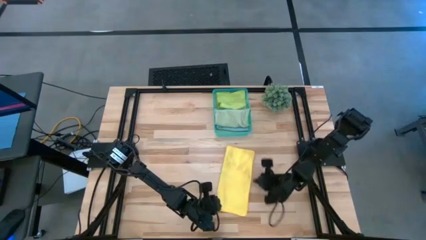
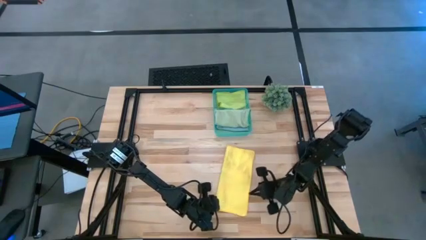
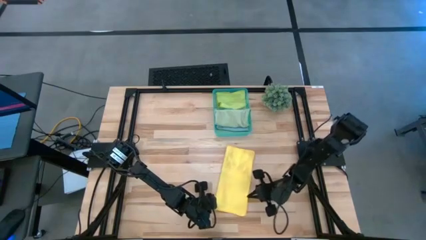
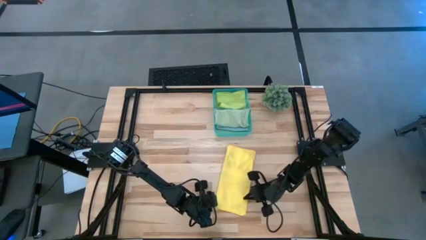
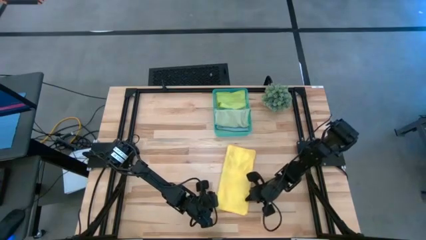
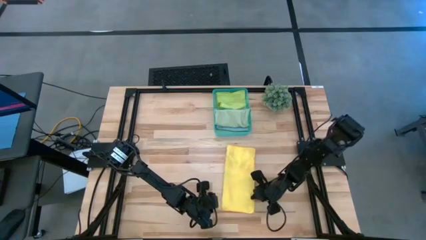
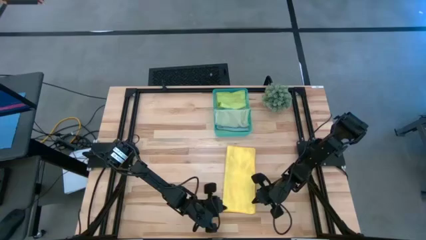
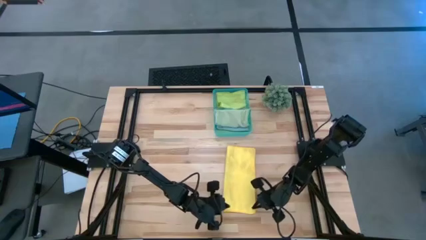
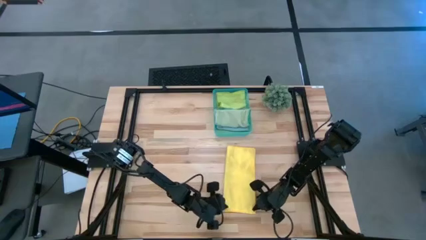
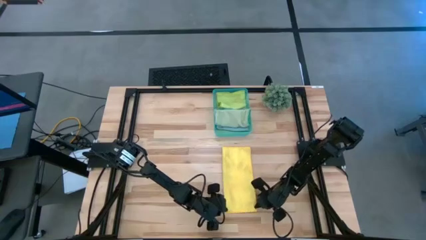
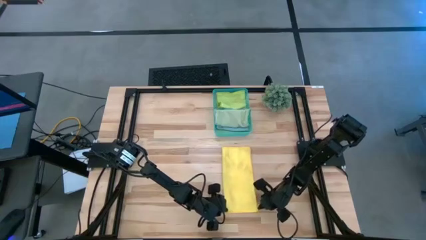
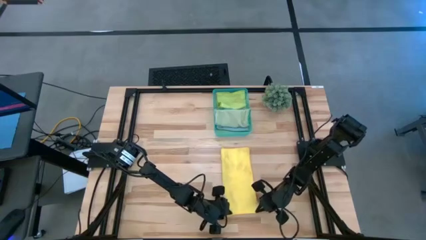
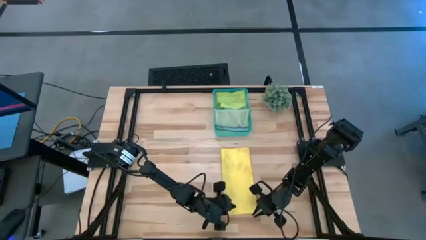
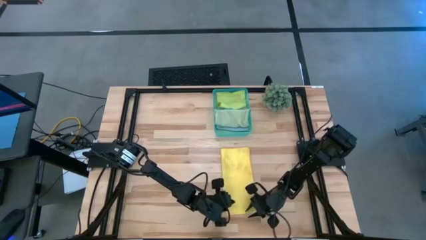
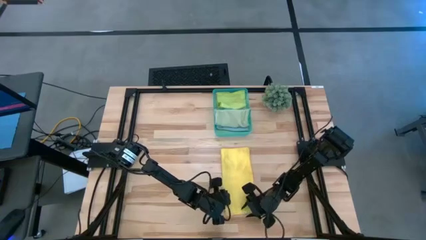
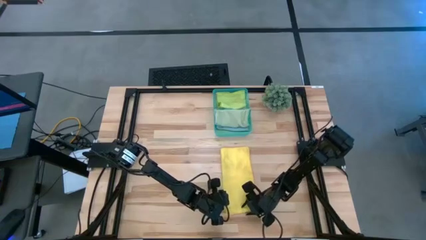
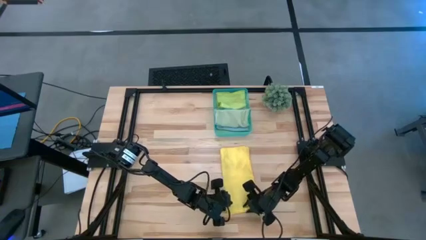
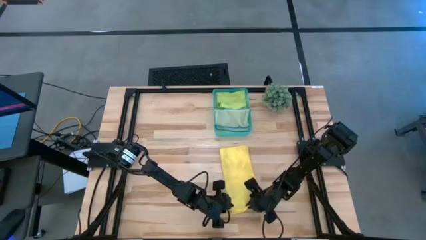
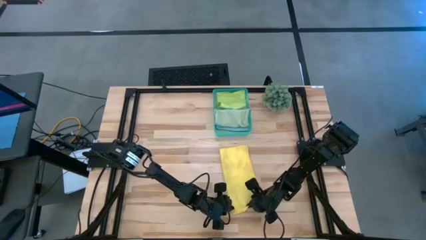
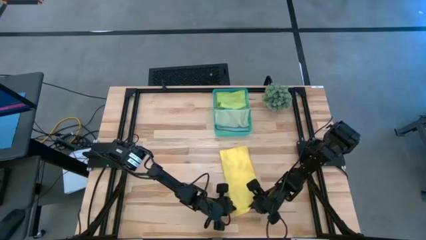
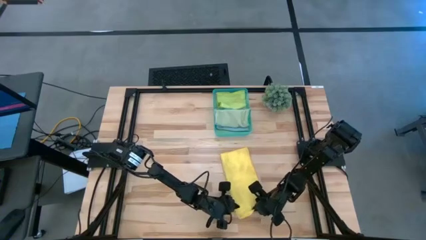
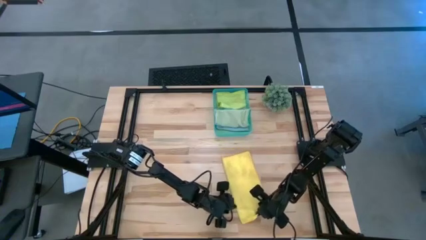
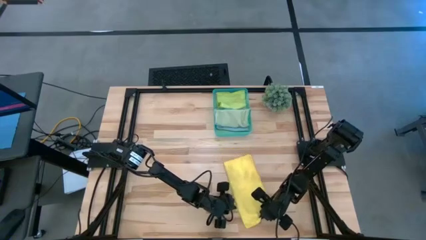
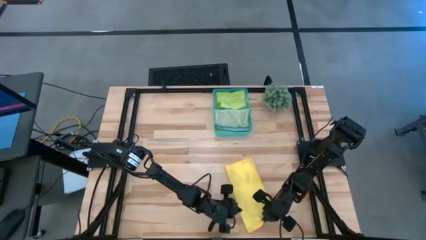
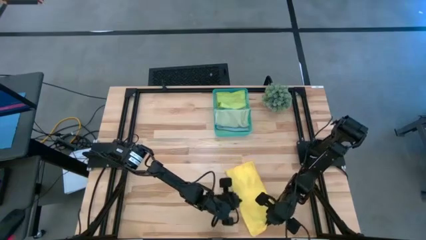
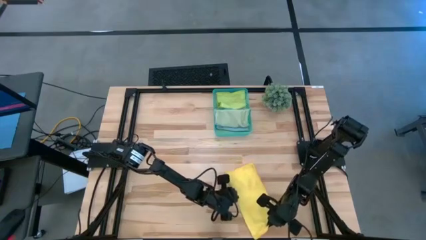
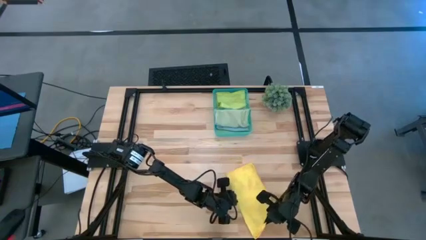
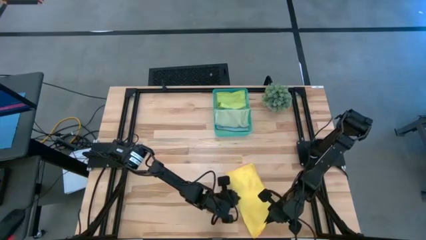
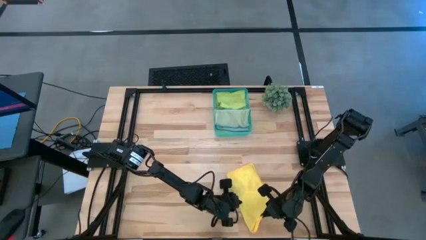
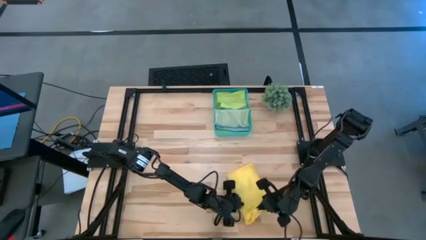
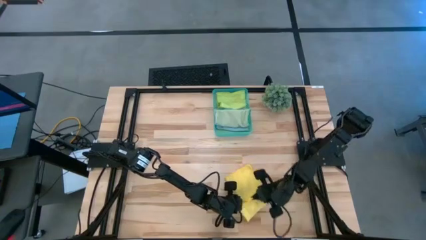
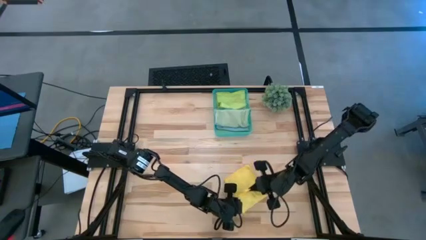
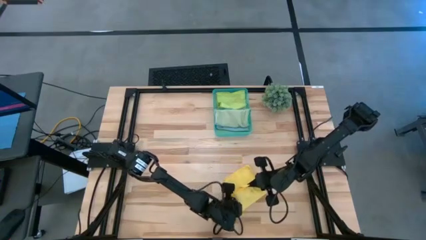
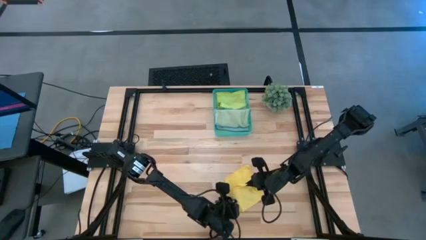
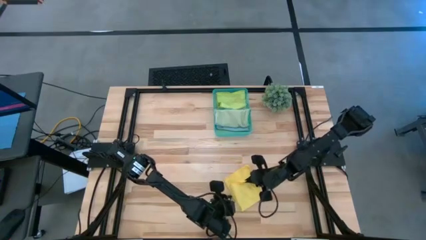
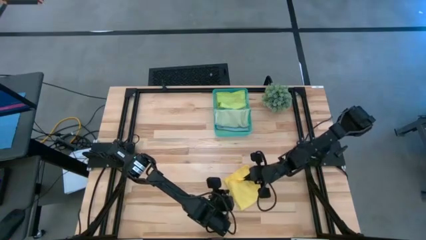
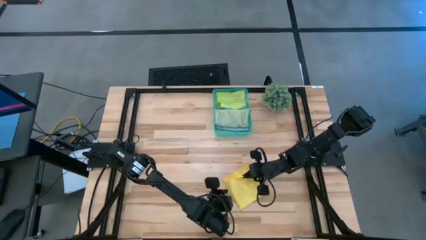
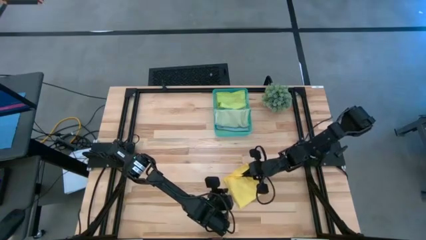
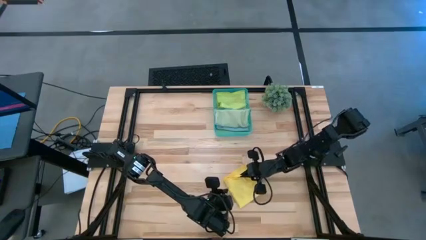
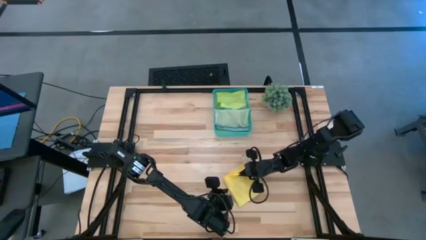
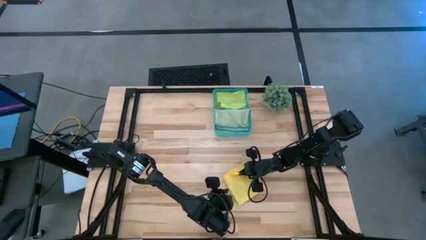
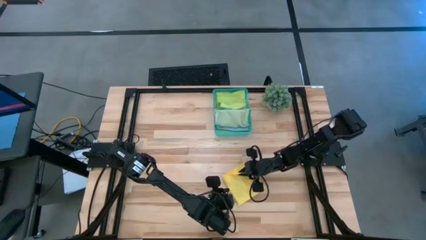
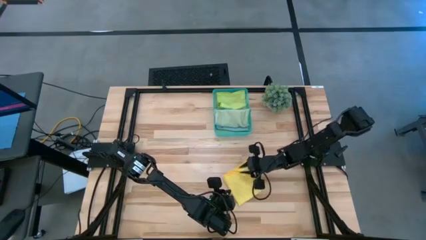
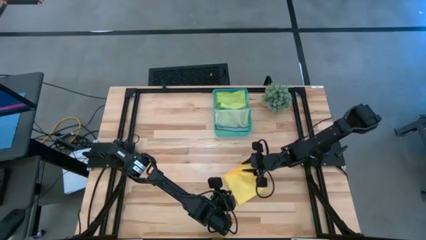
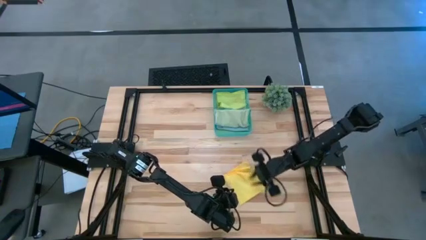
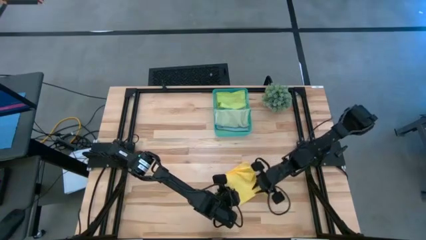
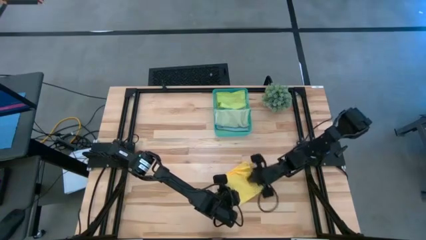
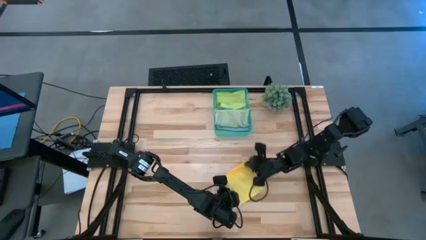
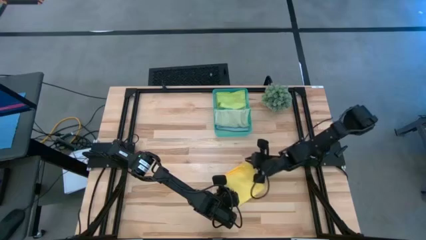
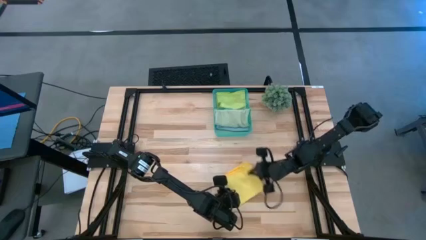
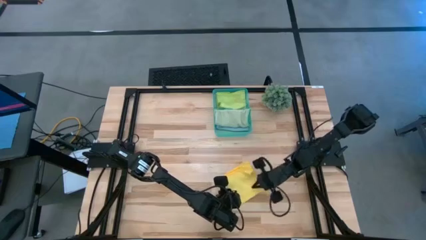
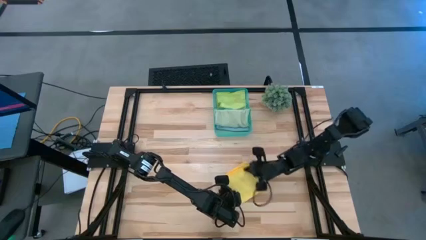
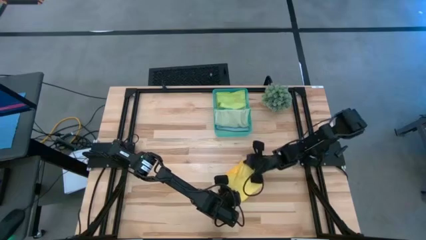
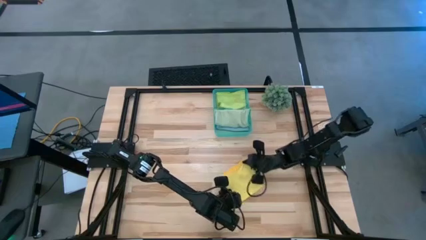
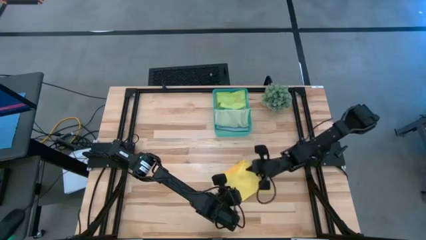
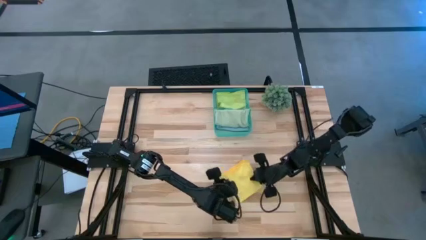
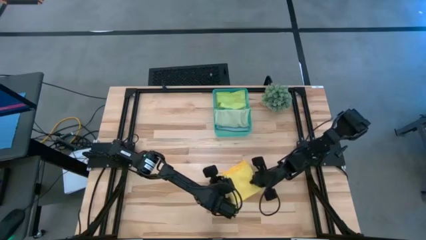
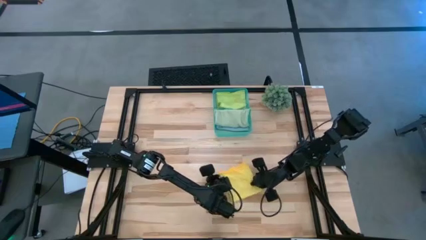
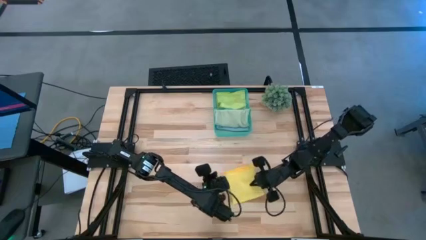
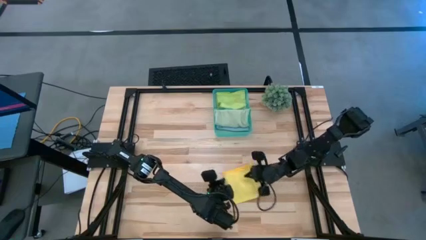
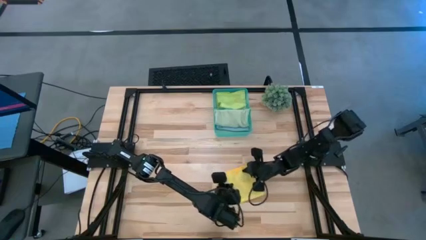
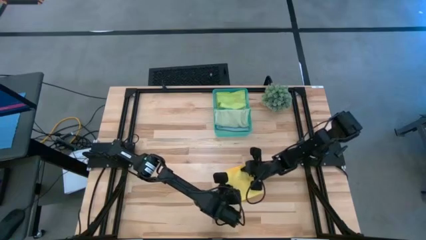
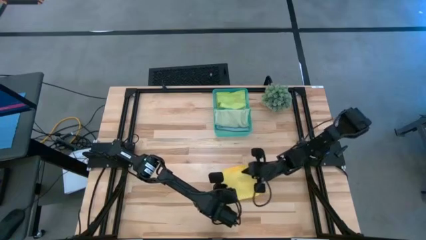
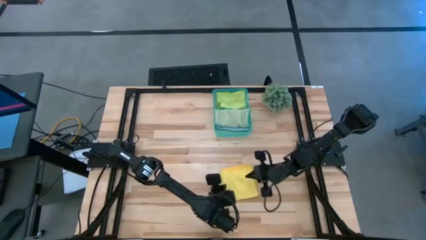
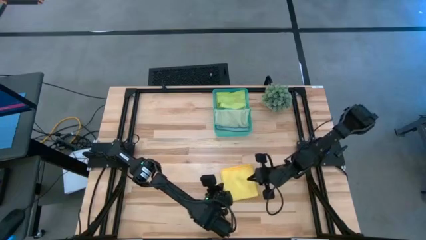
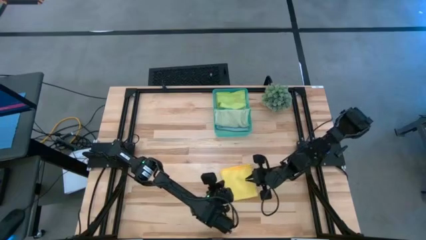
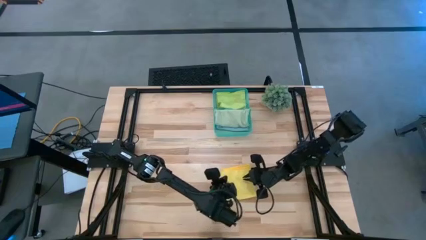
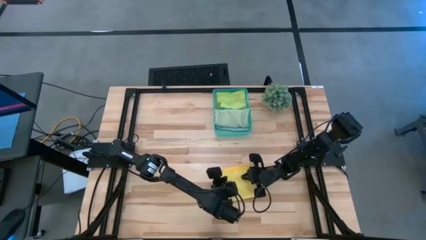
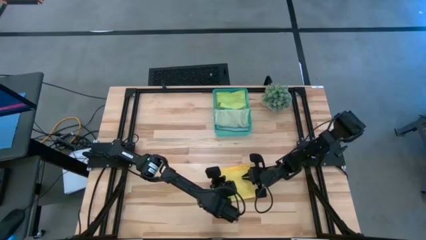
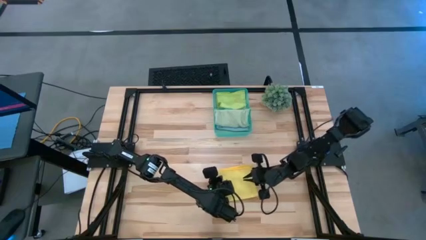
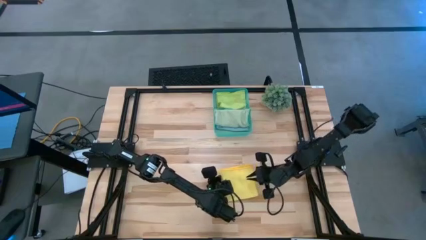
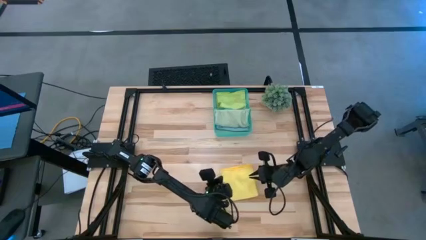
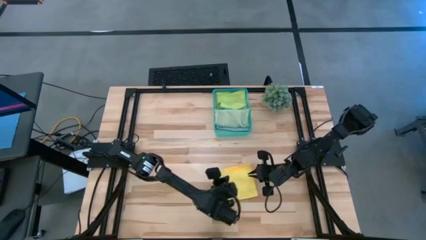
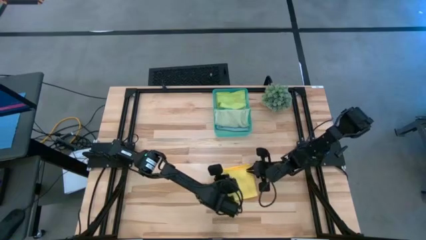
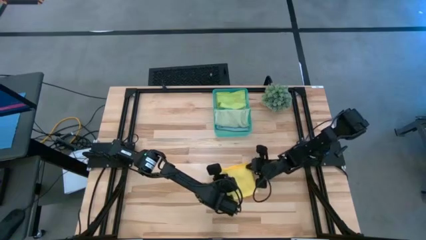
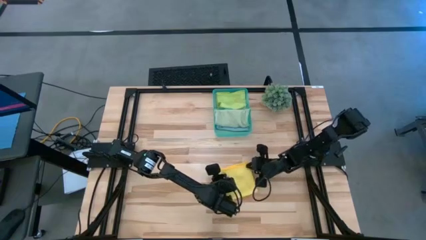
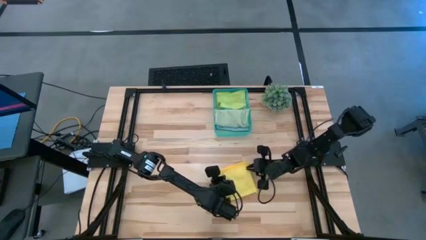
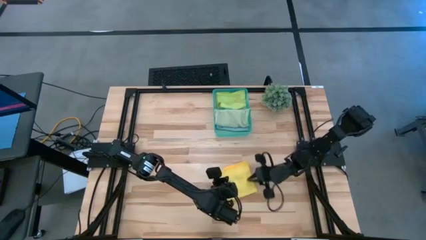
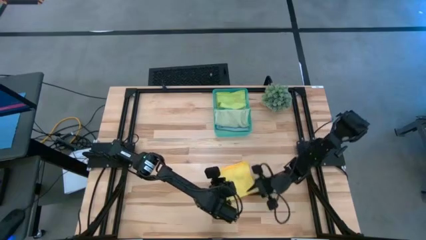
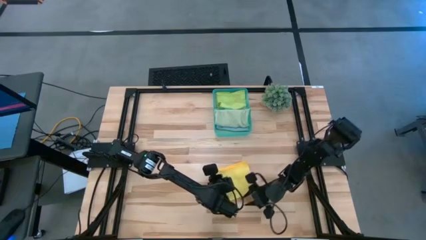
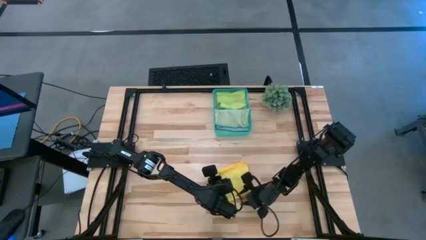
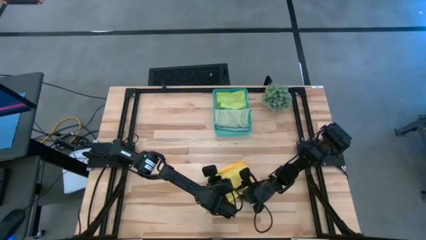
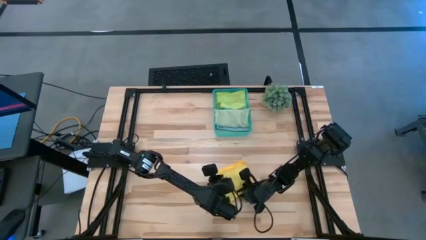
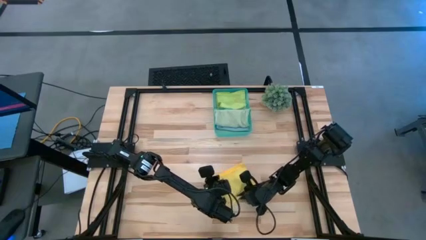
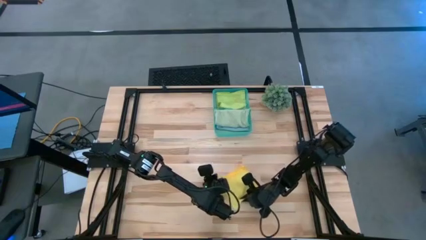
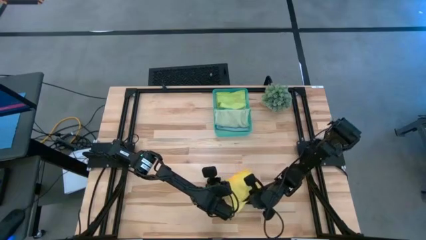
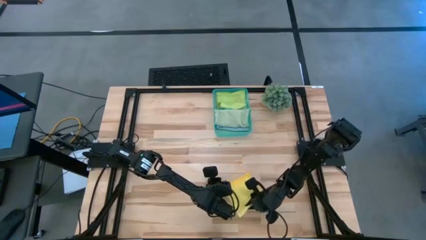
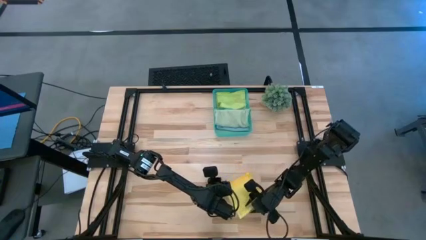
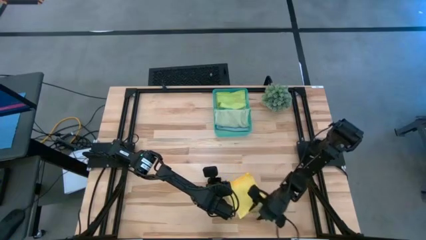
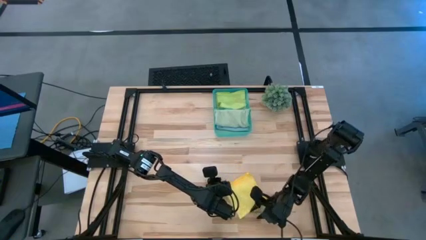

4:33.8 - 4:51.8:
Task: Fold microfiber towels
Fold the yellow microfiber cloth
